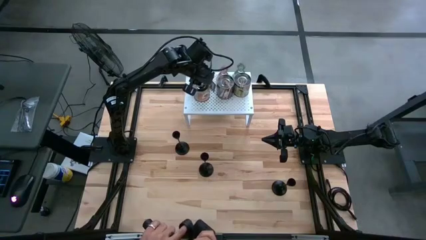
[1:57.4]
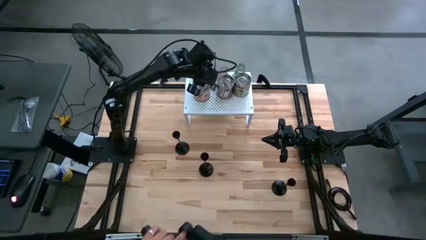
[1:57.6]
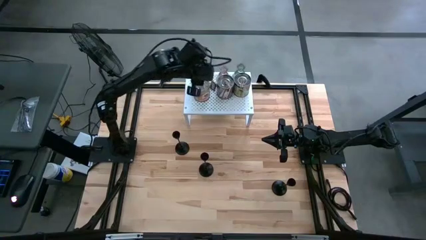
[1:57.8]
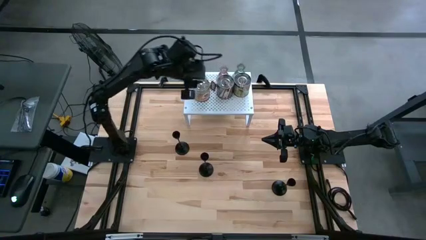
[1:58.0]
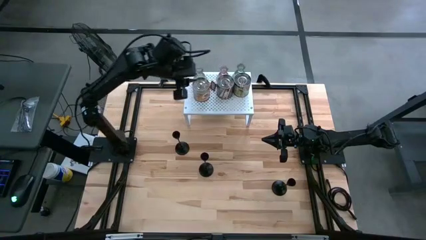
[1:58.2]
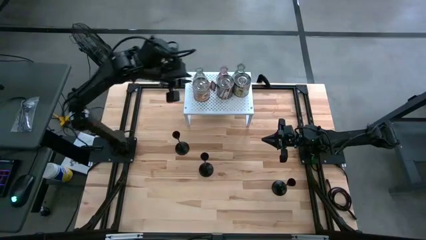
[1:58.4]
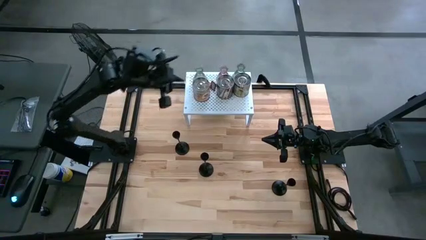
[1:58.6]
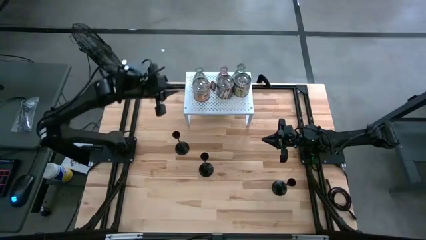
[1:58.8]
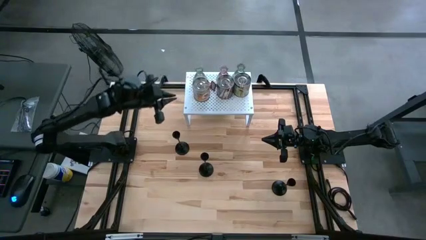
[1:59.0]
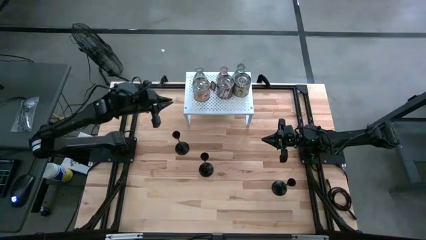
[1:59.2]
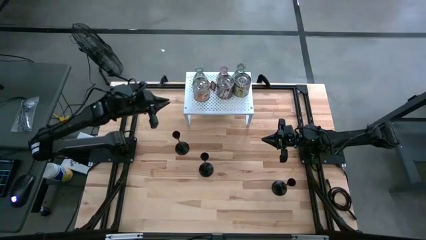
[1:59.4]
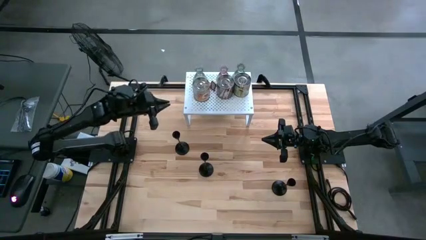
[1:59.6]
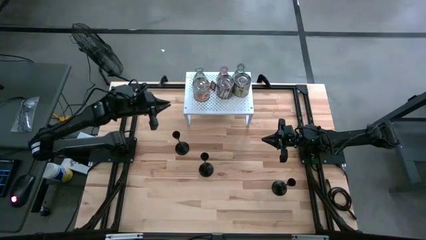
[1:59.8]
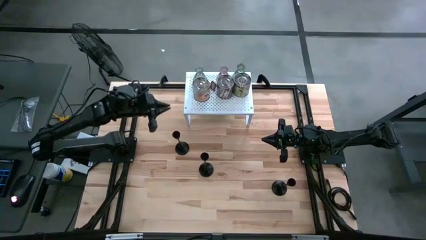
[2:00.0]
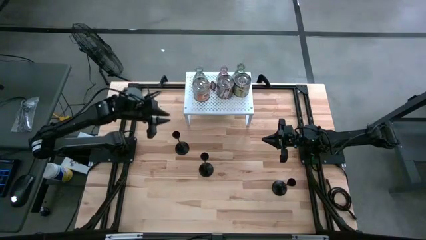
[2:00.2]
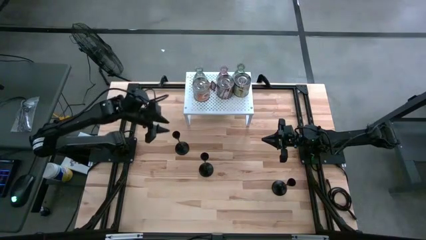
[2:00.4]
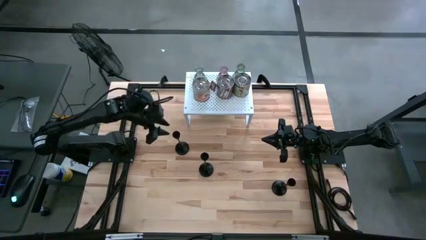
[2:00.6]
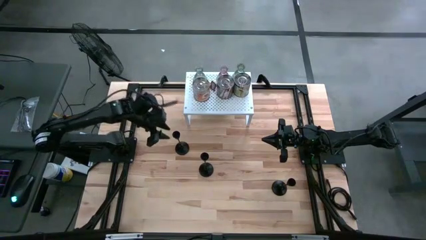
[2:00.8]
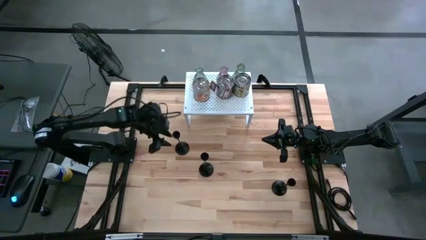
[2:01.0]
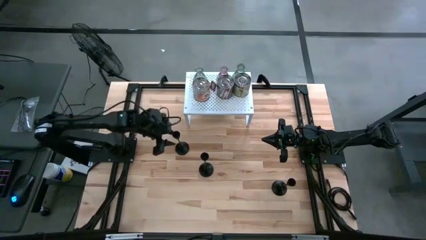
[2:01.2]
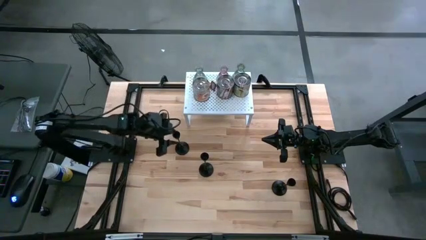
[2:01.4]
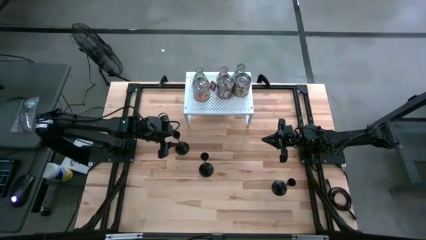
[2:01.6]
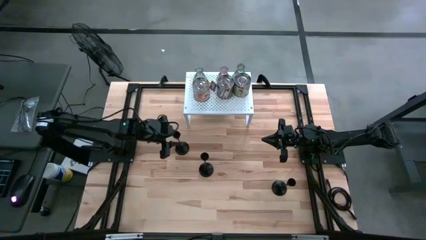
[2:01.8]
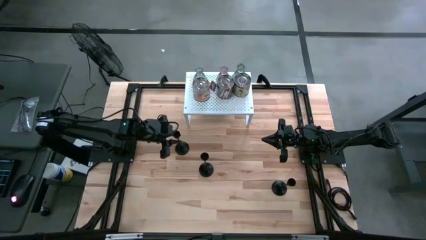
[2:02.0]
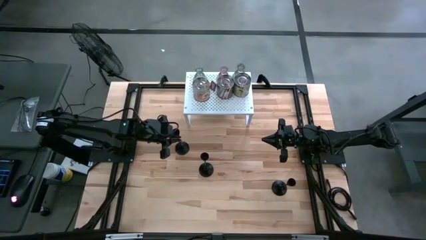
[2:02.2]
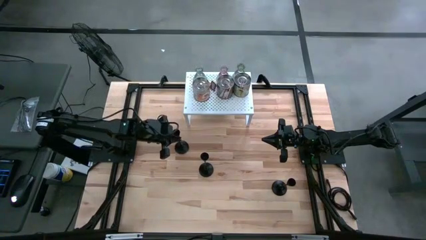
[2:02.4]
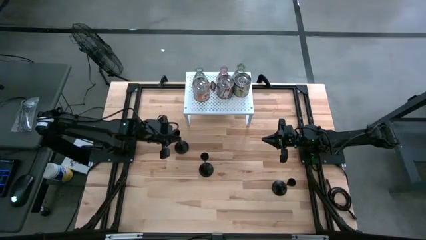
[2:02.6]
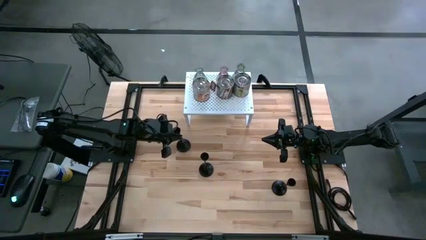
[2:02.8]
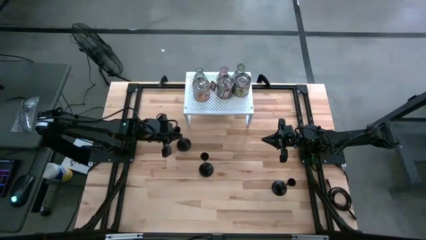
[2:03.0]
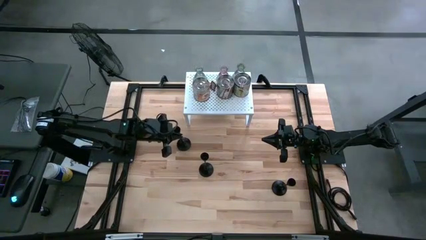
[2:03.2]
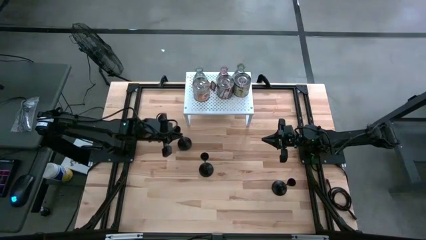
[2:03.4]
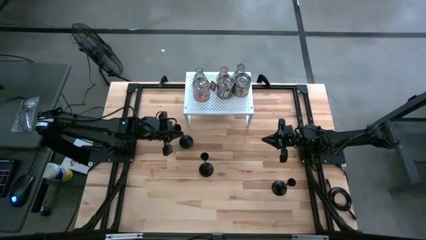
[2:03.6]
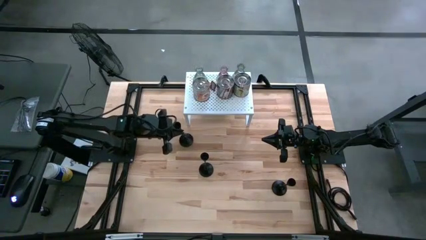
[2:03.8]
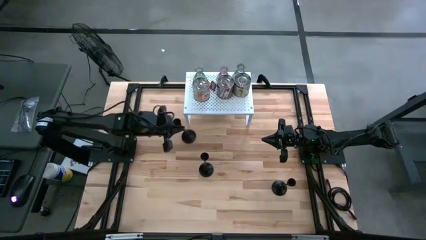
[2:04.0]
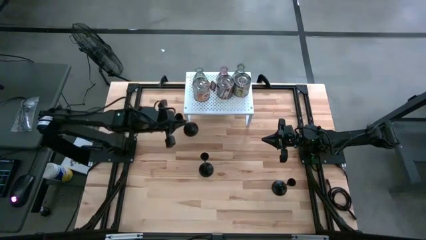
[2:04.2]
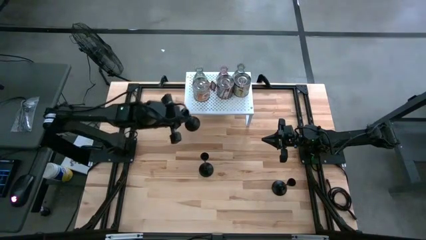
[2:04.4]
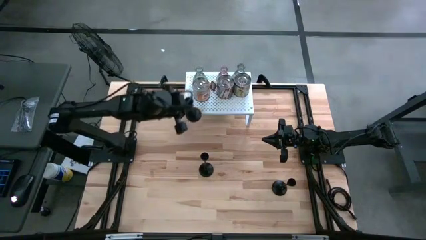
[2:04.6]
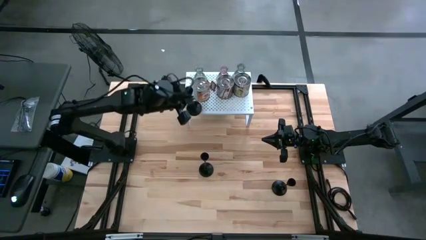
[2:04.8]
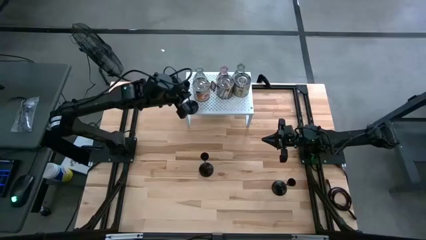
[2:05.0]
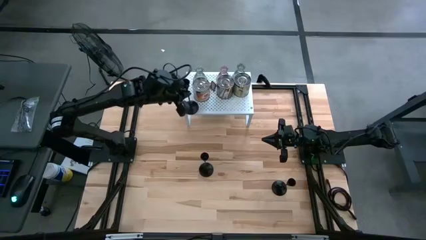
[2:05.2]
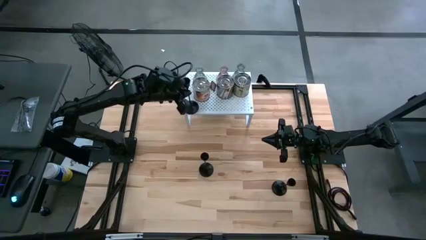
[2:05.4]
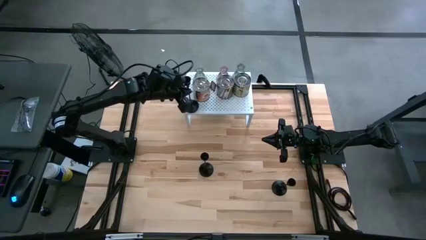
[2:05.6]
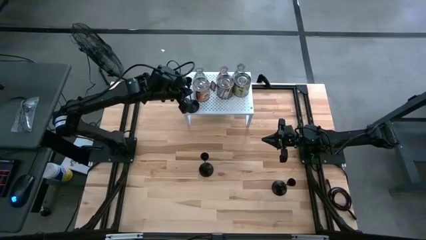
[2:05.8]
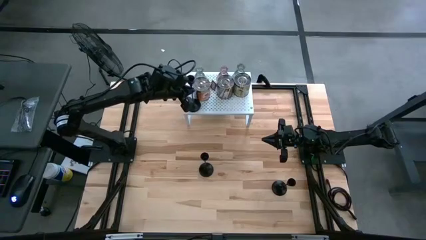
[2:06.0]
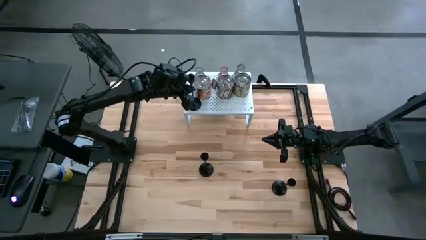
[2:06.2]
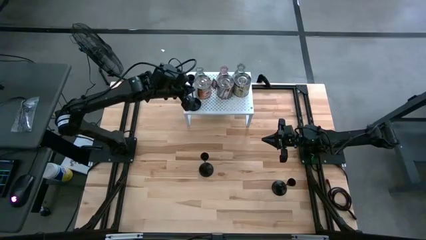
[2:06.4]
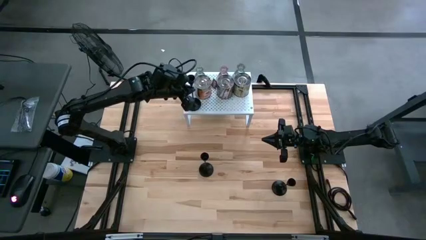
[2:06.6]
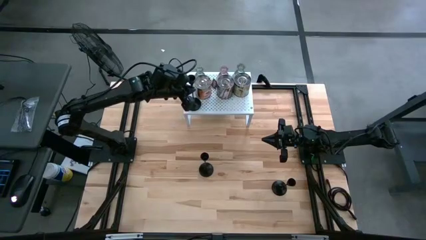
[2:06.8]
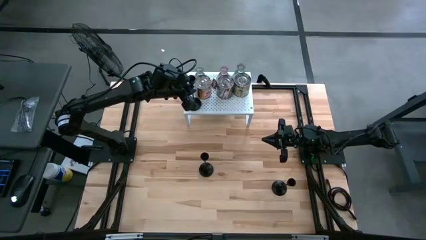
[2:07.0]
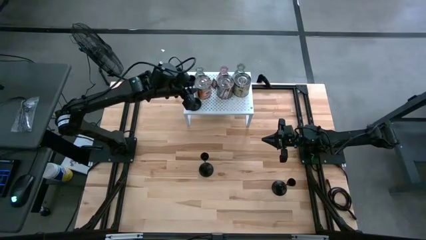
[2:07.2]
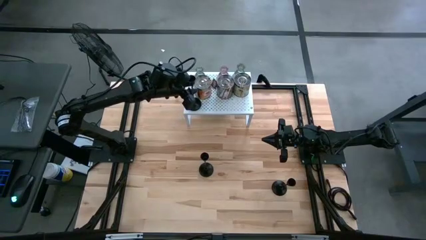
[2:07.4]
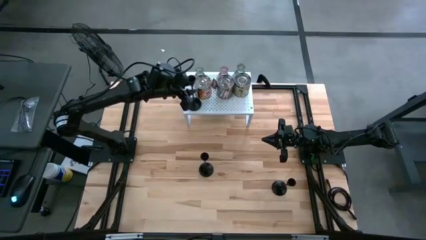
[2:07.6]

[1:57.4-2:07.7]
Task: Pick & Place candle stick holders
Put the left black candle holder on the shelf

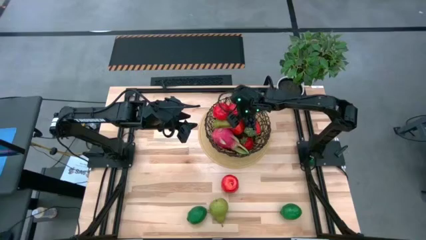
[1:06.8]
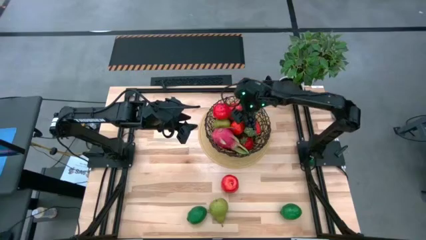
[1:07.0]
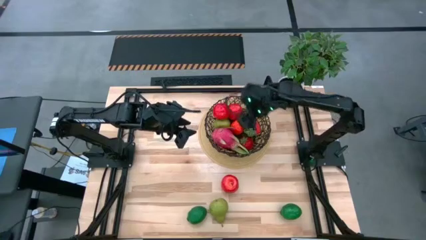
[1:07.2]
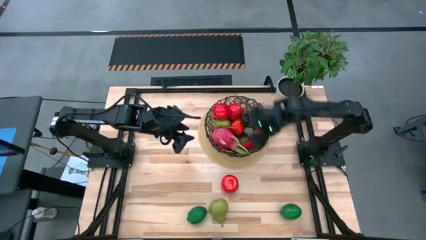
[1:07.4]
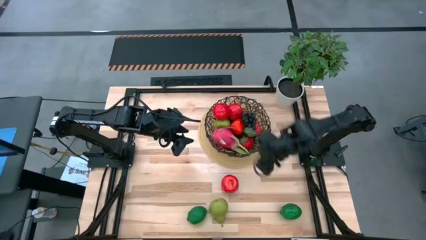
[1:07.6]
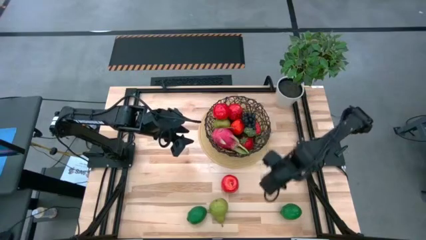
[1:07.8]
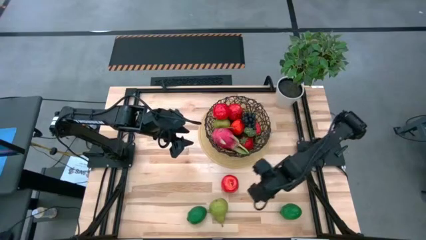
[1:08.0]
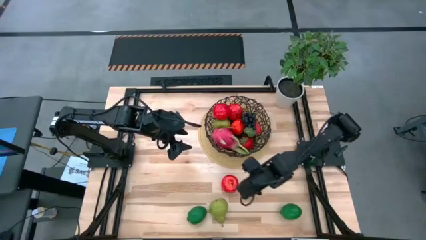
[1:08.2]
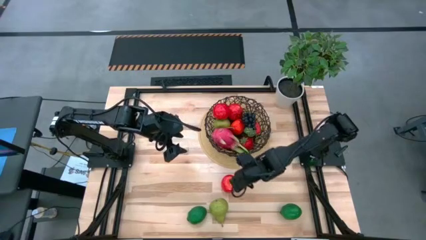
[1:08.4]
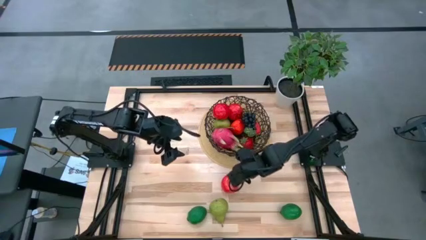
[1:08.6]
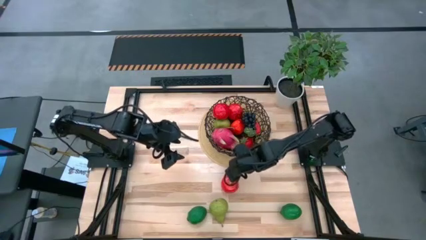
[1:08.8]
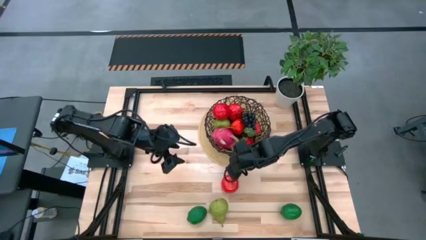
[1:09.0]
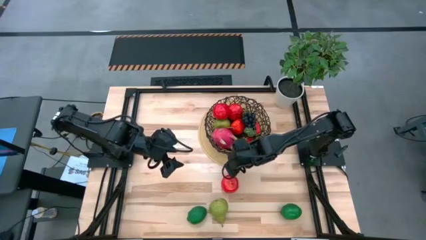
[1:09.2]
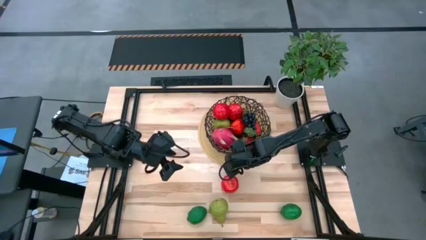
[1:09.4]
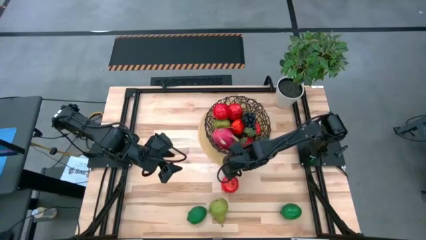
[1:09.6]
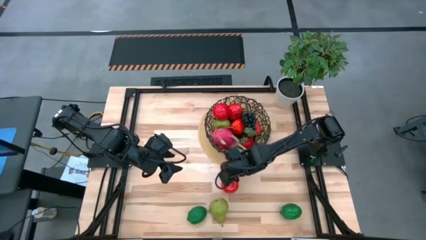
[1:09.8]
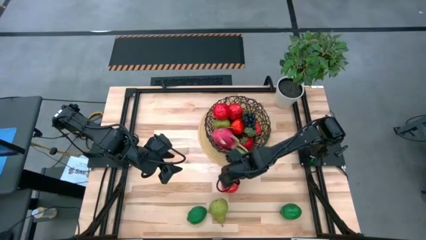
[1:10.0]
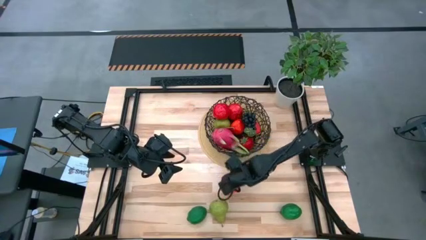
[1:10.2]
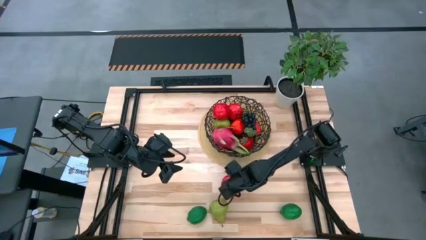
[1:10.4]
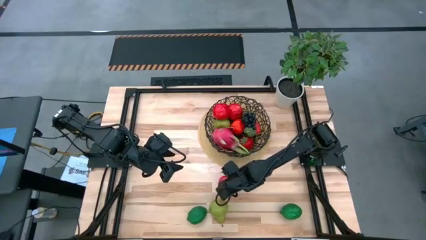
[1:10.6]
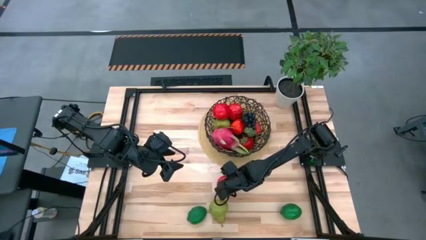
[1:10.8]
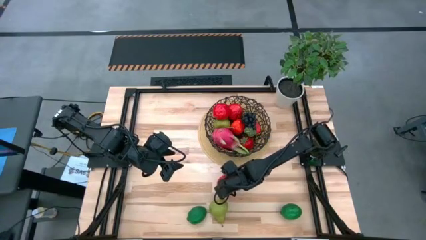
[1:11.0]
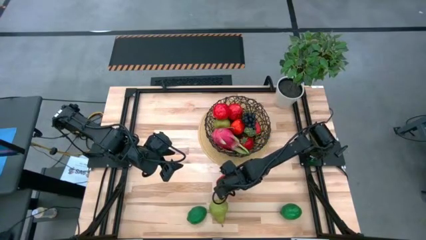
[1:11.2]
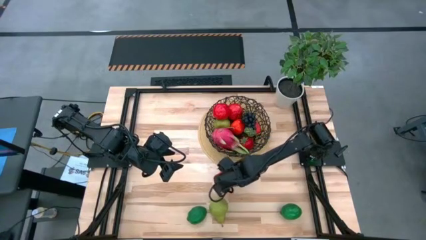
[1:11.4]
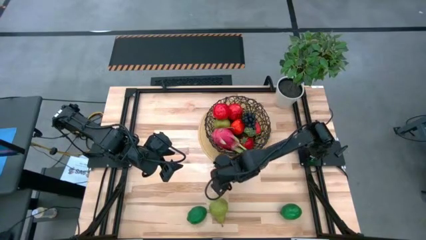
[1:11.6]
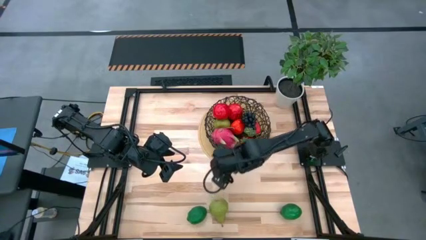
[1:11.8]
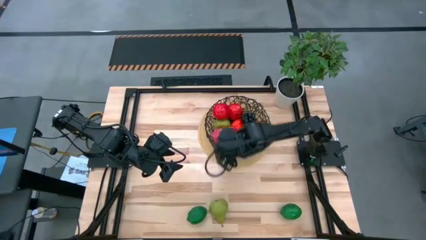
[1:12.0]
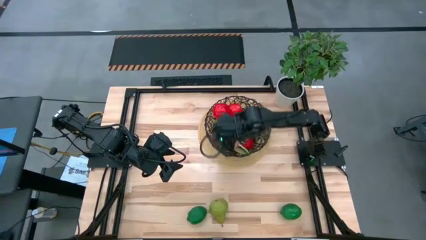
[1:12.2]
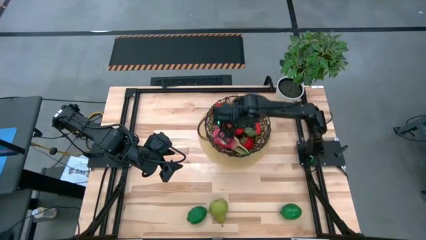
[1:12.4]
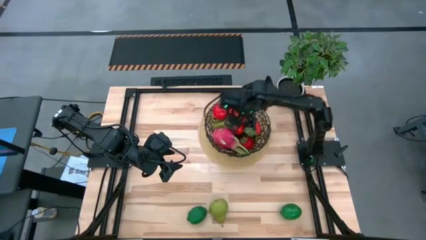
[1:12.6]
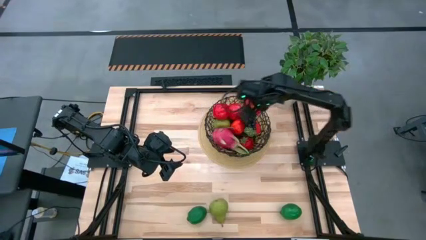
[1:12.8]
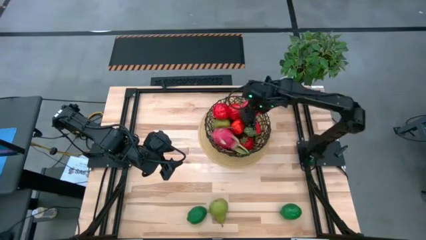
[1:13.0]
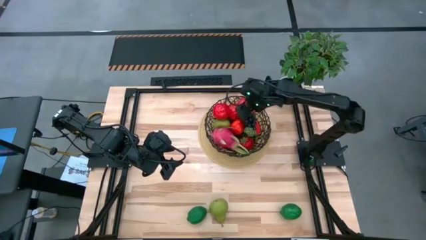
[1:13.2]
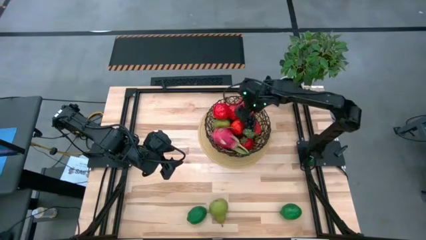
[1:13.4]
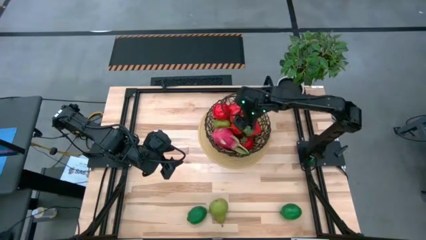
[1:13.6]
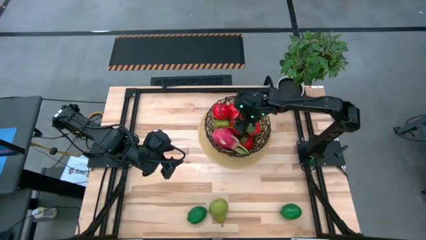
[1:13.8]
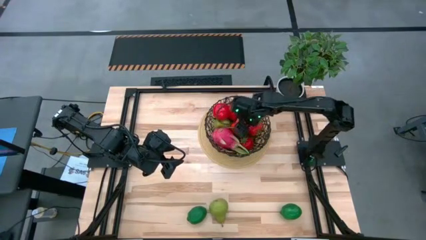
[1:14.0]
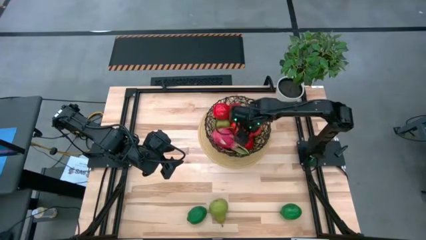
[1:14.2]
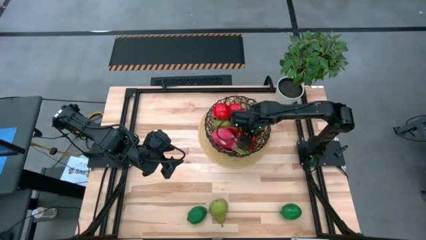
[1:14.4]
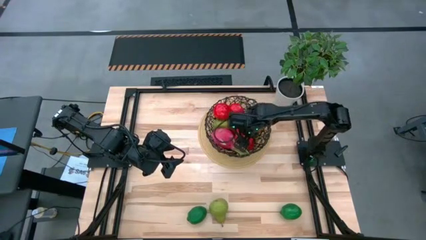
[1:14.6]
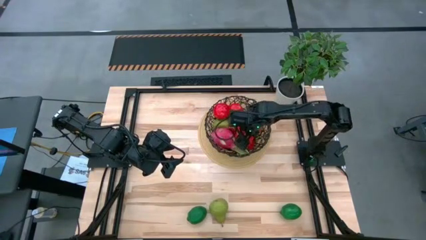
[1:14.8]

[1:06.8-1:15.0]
Task: Build produce basket
Put the red apple into the black basket
